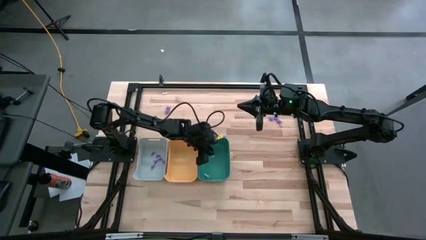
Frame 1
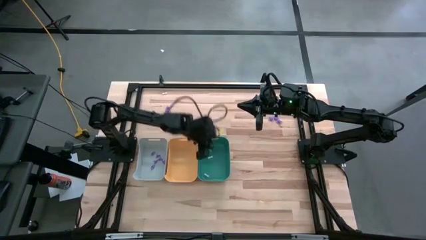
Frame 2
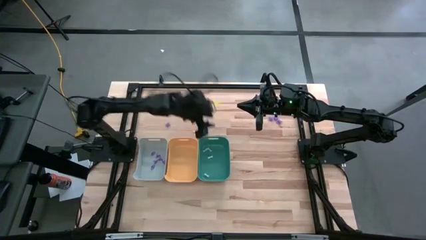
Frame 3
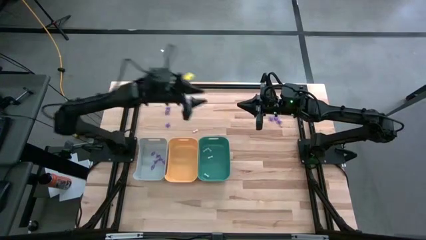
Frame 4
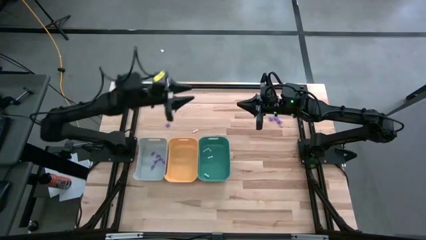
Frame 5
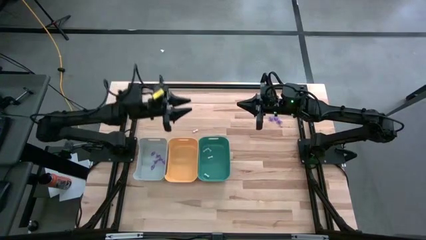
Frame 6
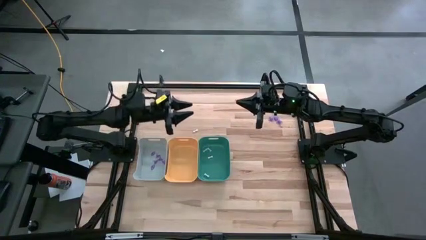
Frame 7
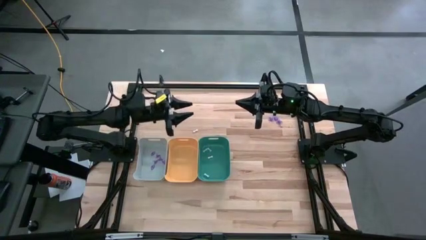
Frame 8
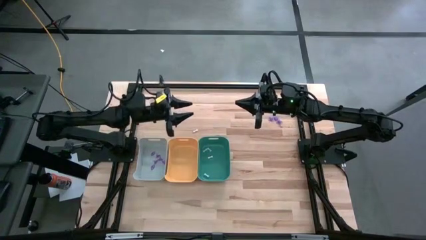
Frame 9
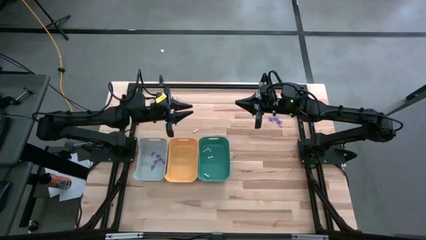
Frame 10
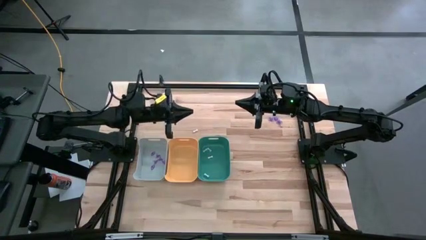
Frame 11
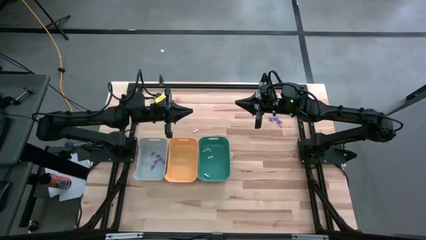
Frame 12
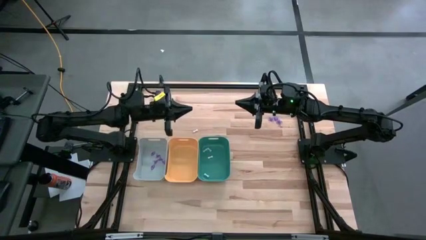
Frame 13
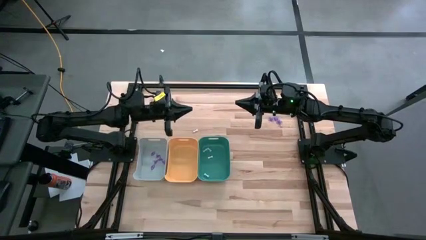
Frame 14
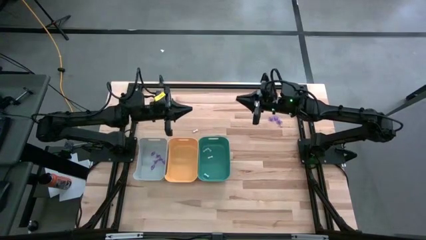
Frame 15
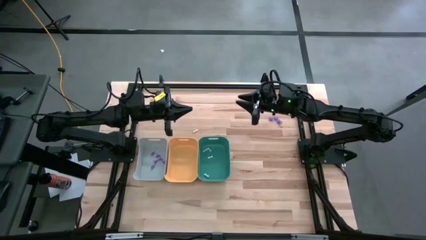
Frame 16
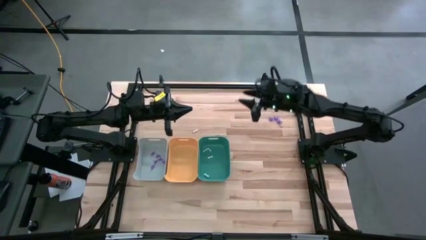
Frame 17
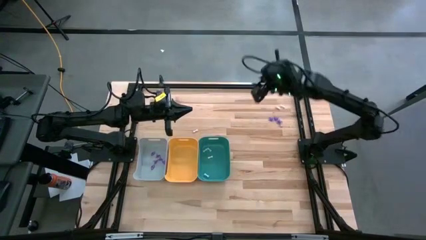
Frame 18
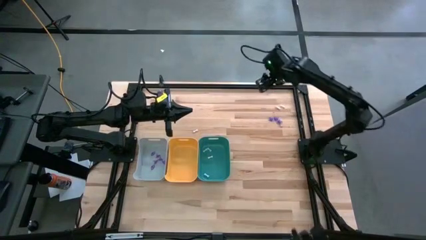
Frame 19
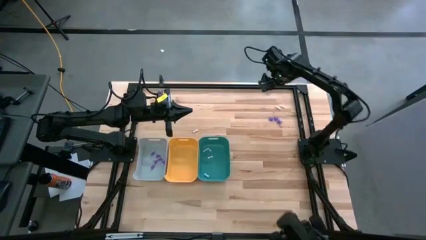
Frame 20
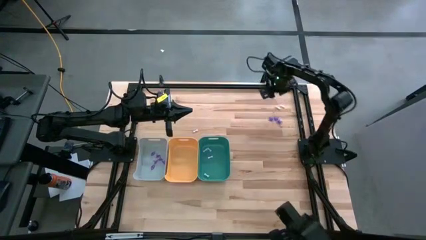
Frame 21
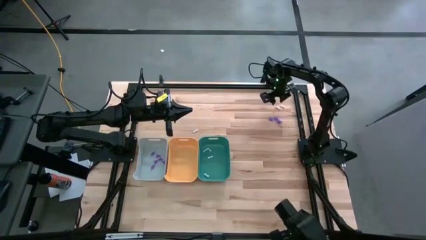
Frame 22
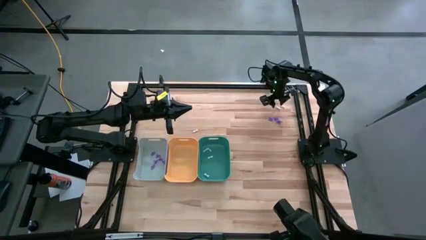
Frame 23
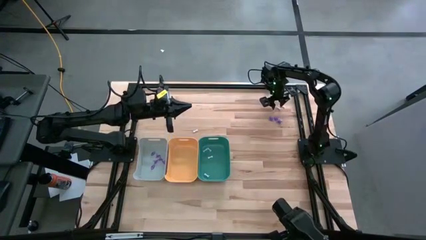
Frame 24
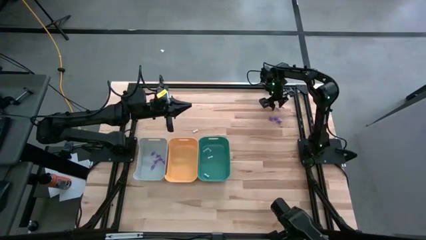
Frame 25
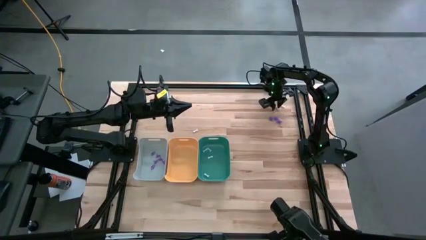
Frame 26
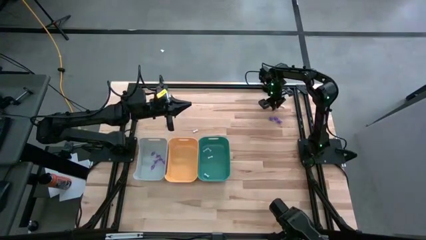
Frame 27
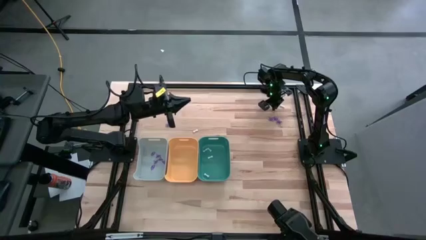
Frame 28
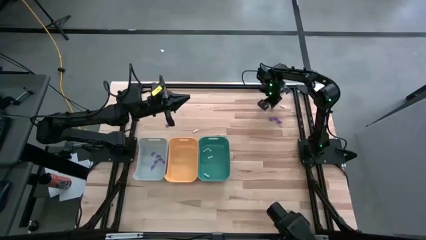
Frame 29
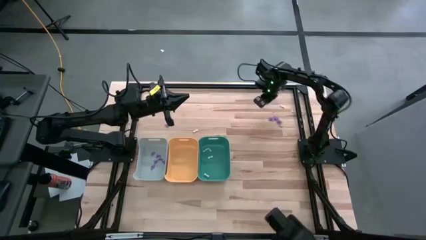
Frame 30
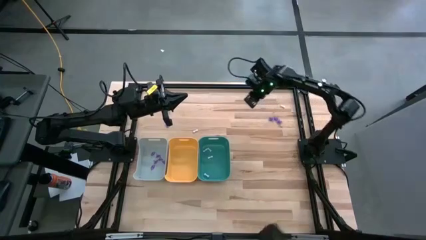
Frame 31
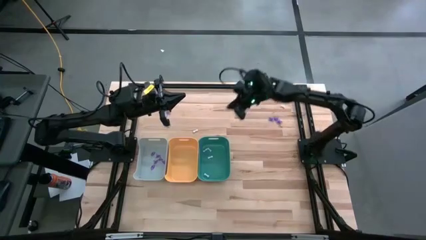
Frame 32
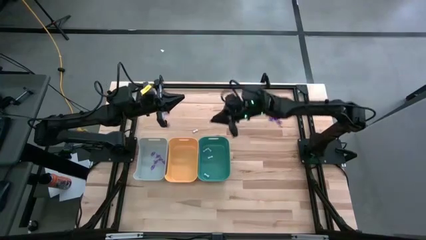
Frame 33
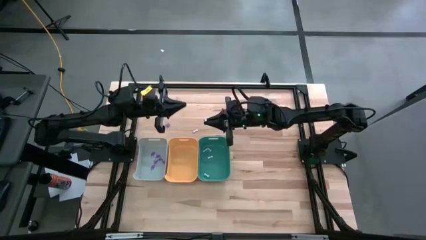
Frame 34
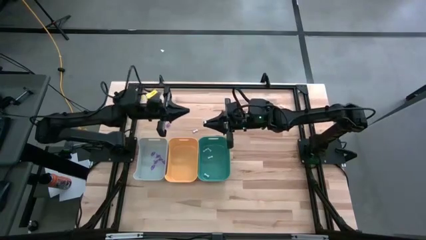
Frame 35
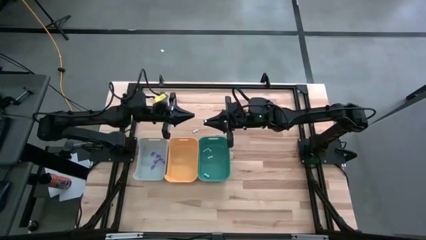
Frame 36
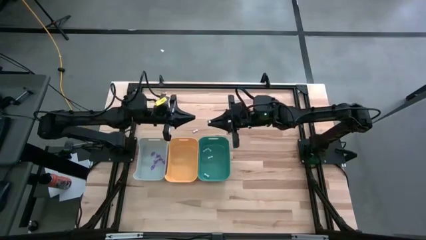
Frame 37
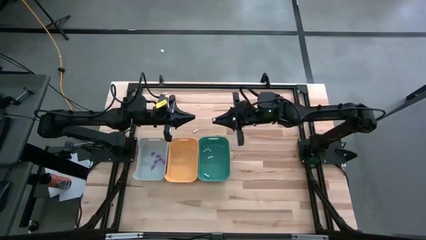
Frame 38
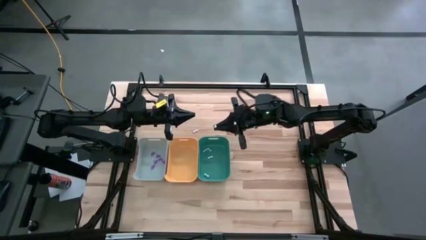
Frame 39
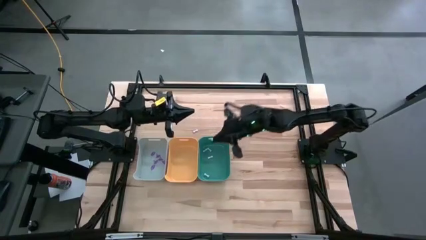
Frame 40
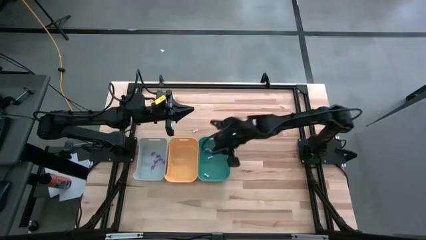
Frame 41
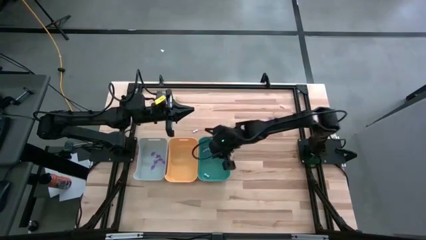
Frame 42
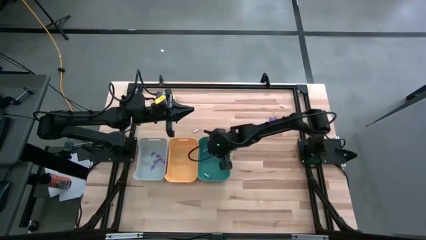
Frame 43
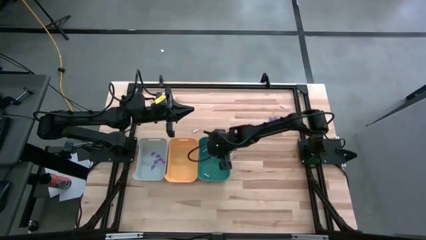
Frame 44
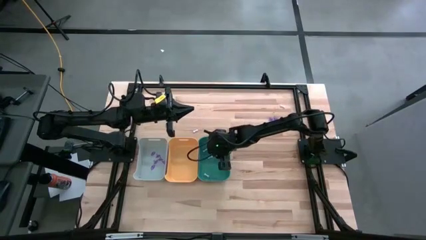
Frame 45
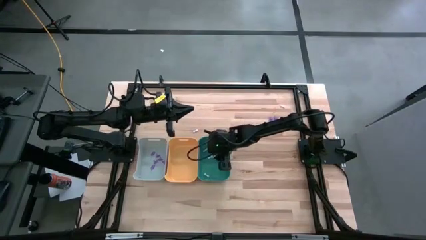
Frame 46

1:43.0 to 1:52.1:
Task: Sort Halloween decoration
Put the white bone toy into the green bin

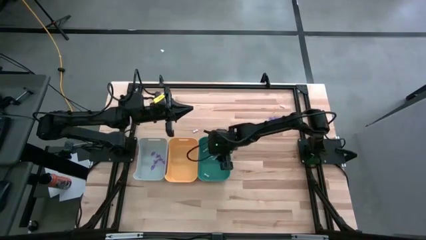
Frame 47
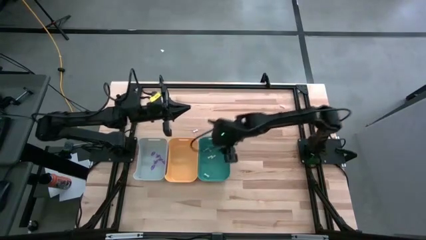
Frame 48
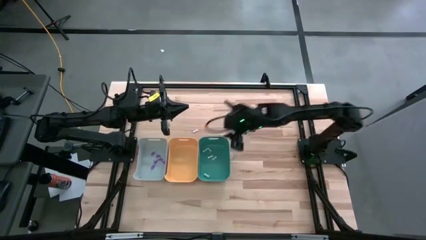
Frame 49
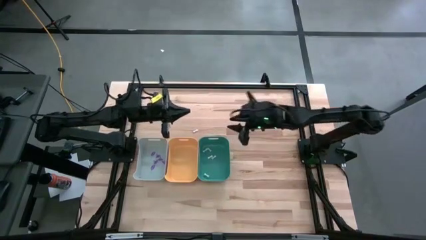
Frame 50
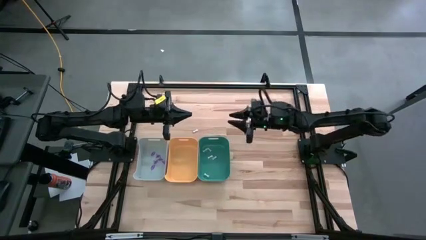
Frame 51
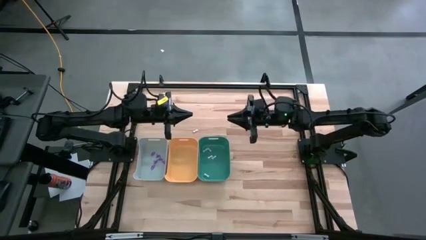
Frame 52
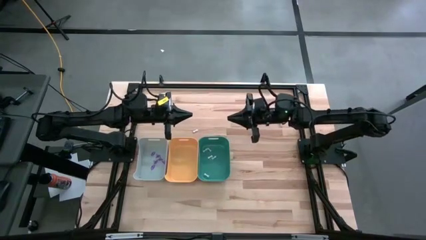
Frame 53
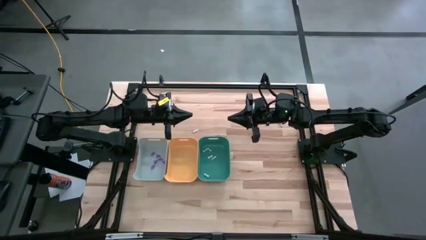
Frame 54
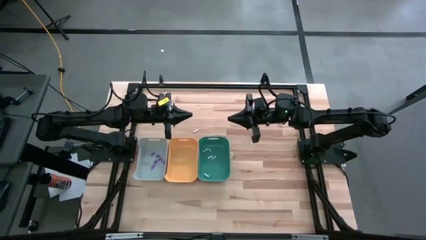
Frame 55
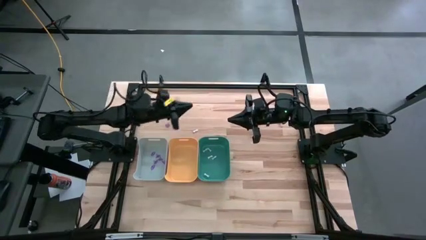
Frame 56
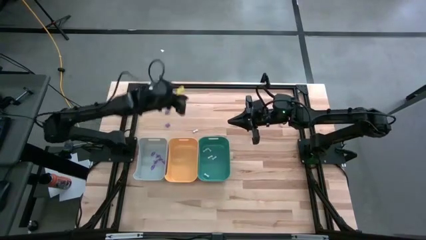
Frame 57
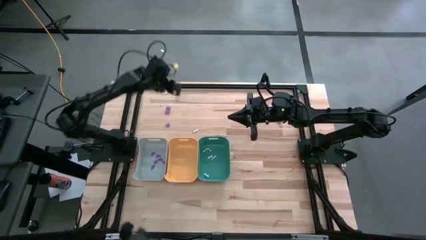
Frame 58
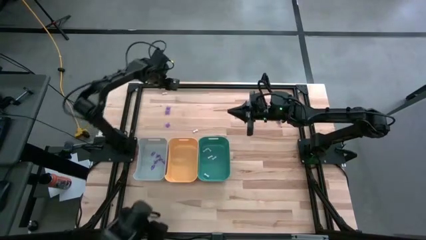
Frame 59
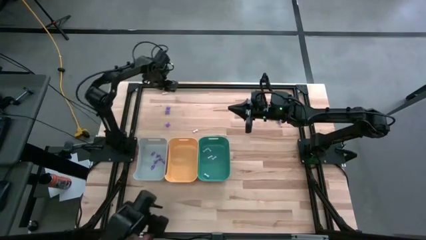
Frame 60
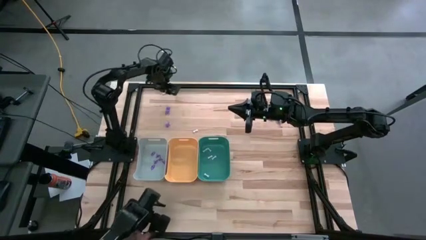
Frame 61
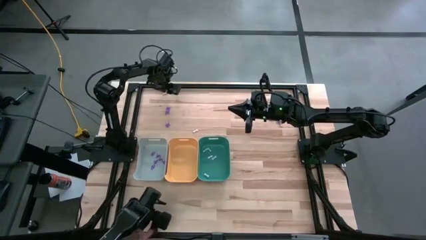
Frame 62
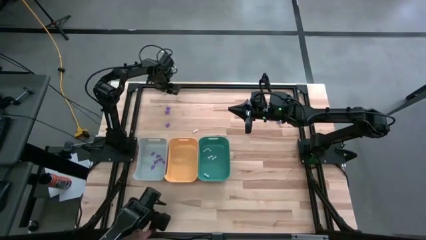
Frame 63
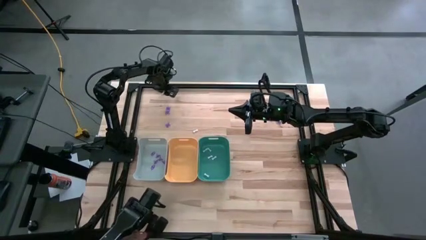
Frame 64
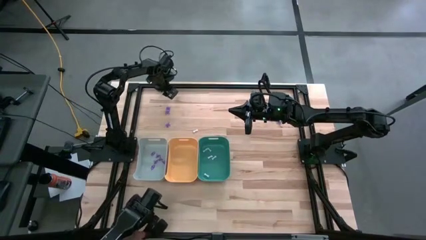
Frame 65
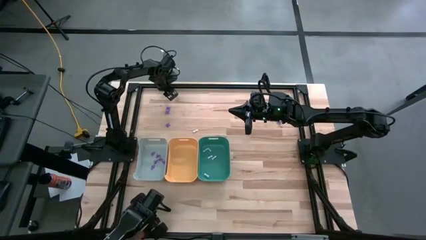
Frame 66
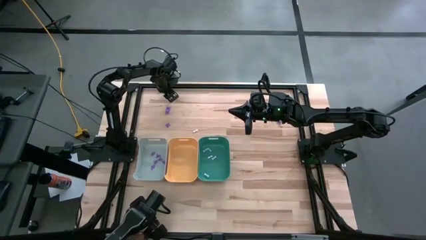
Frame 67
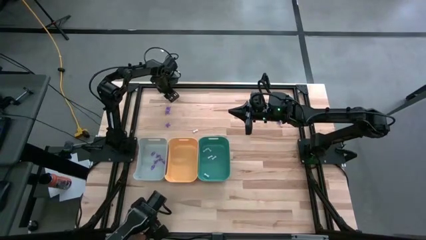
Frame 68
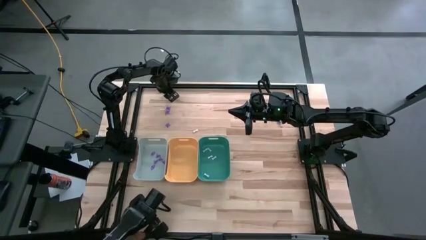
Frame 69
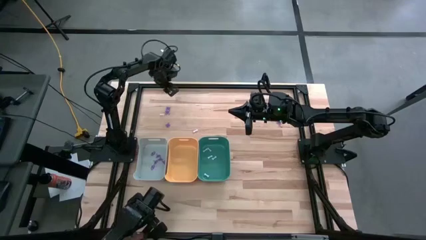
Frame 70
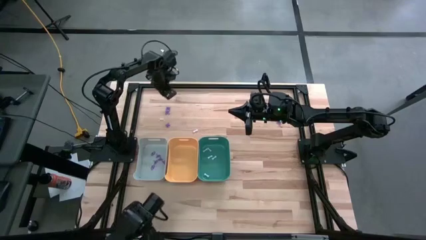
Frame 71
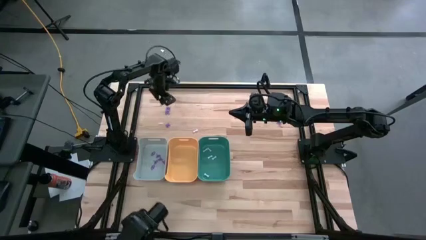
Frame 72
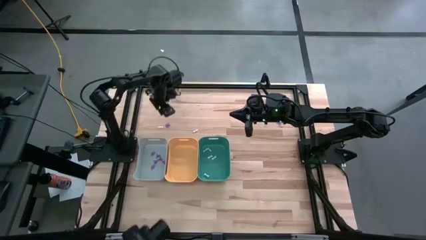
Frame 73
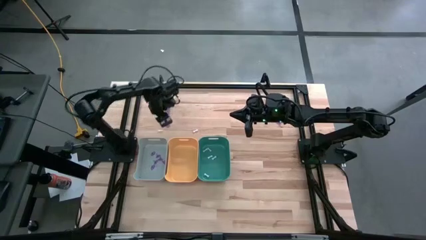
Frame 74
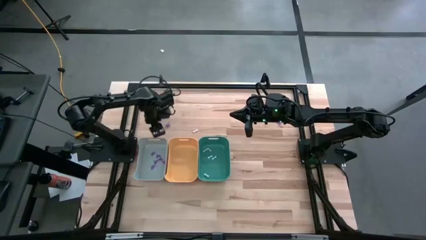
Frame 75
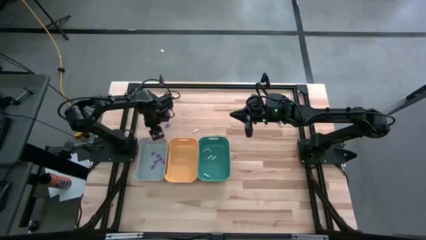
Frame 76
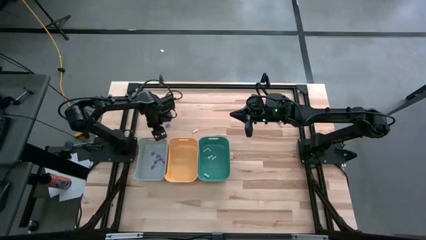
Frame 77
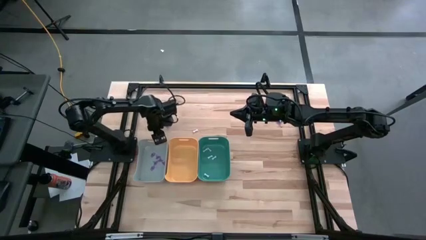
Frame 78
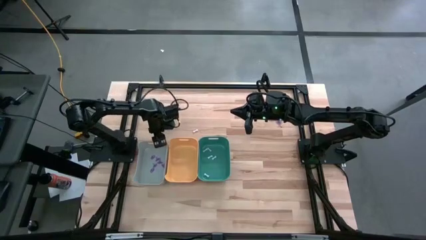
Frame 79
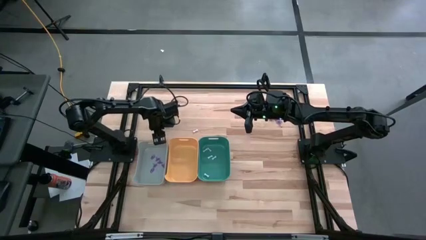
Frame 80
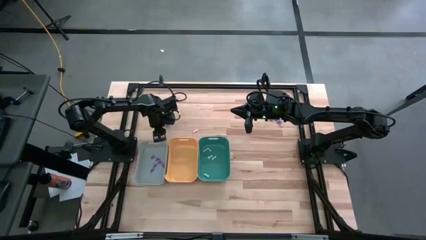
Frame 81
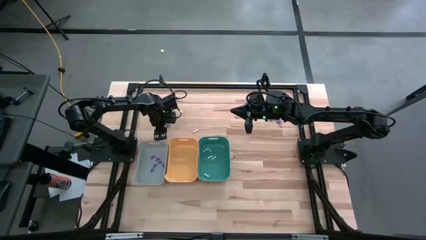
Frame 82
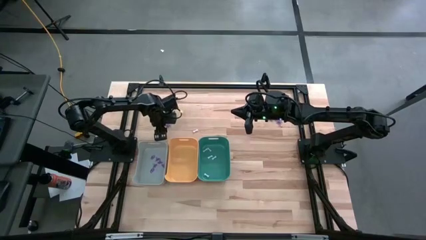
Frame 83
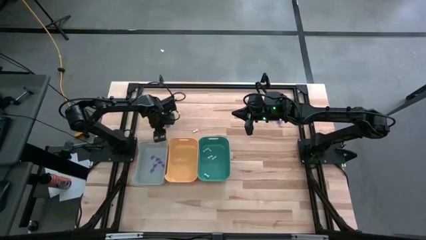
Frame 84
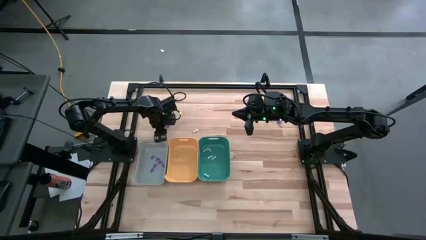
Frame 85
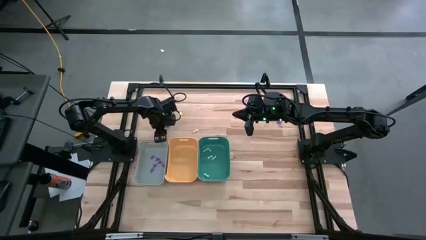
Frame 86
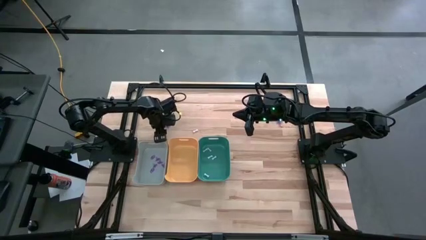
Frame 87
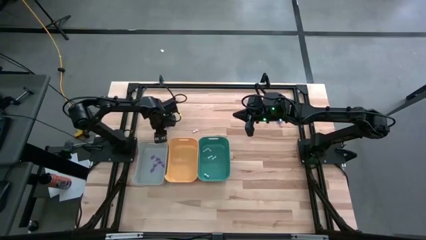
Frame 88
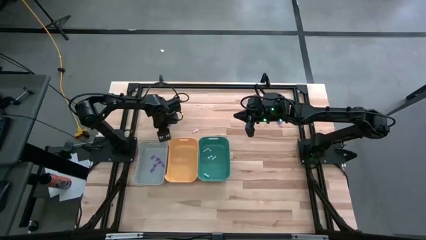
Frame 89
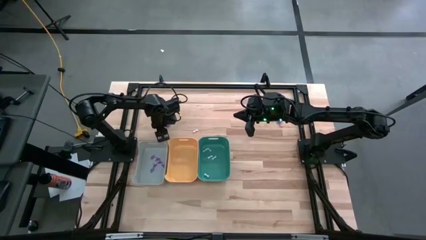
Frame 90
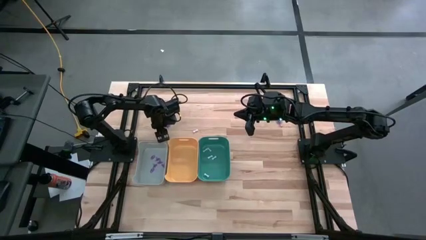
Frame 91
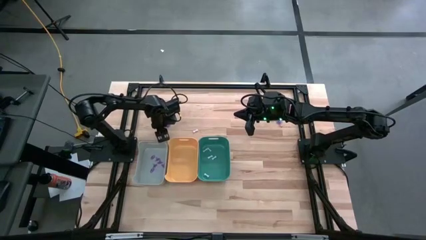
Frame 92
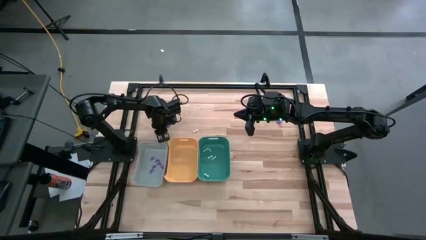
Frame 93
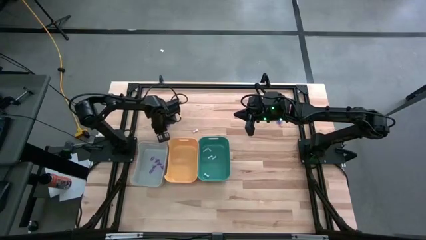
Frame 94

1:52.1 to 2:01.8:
Put the white bone toy into the green bin
